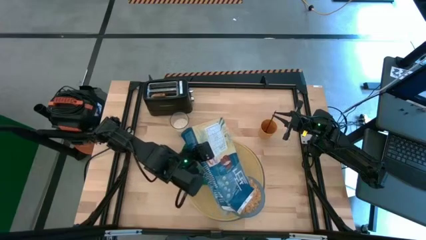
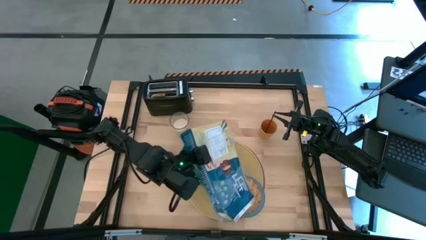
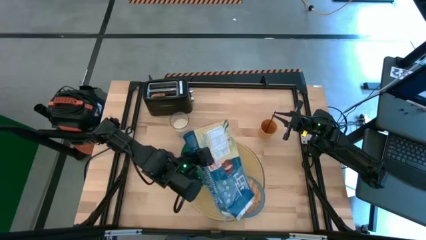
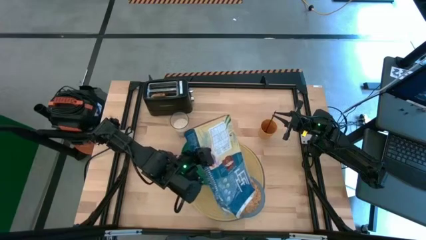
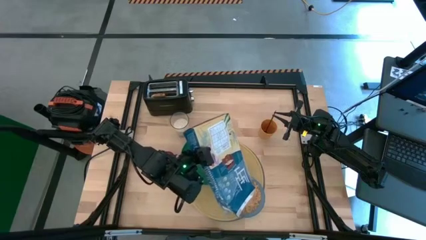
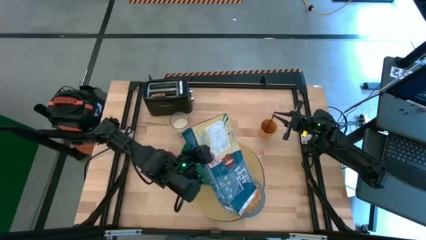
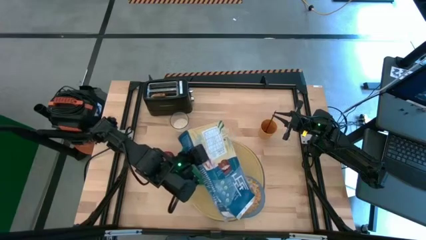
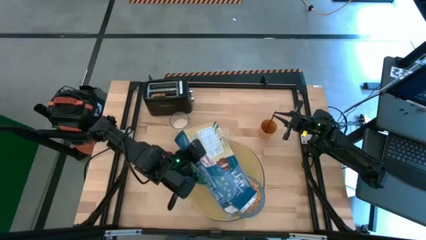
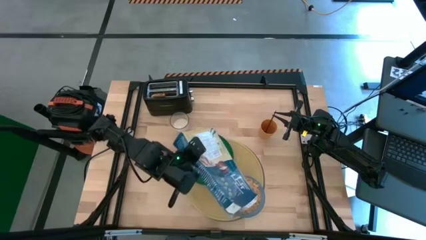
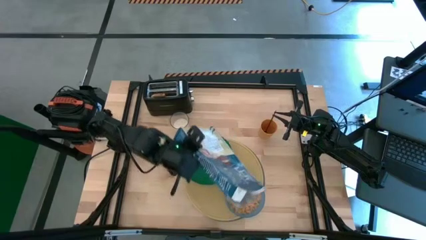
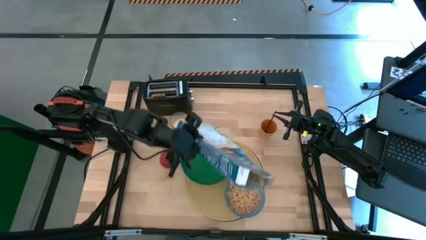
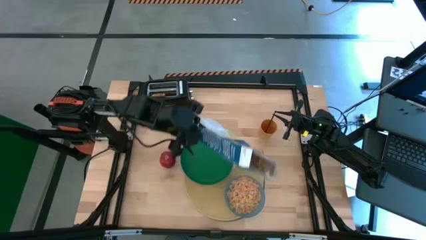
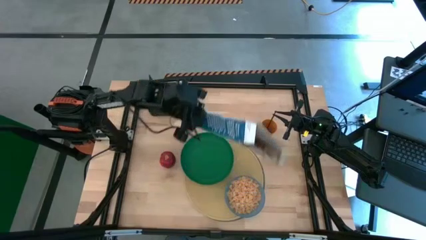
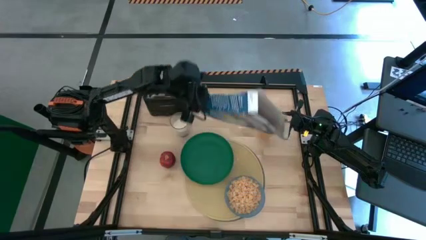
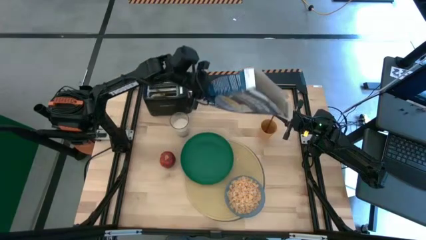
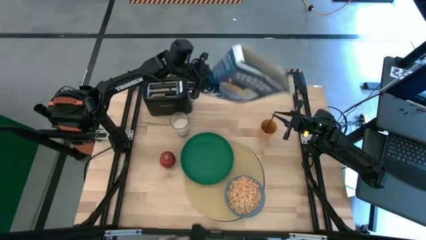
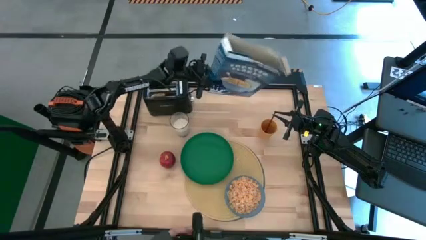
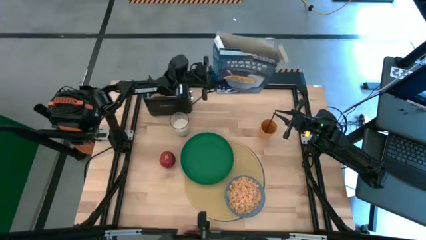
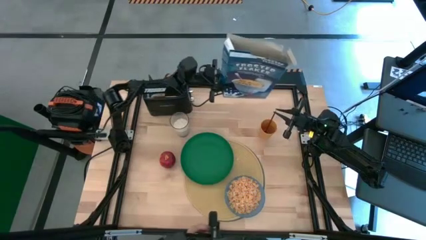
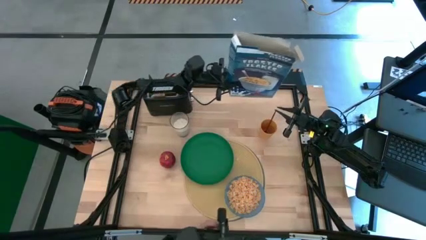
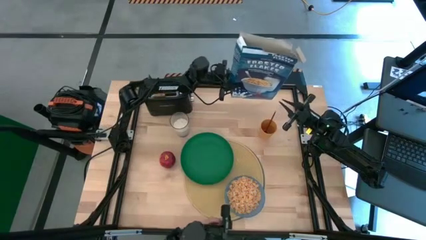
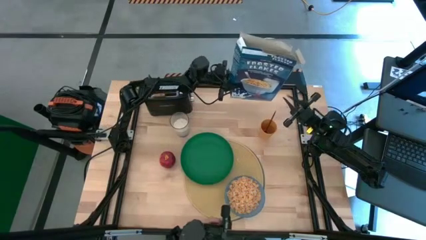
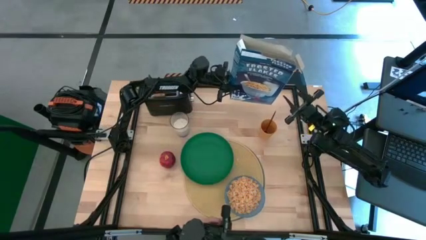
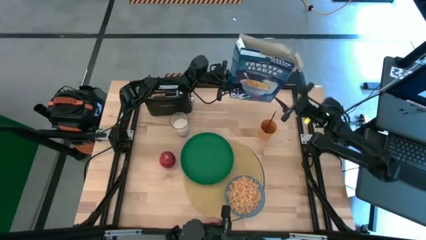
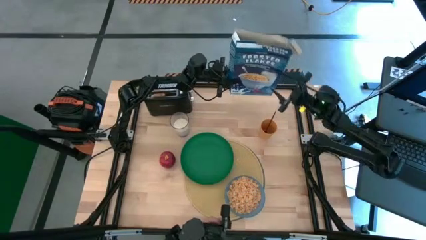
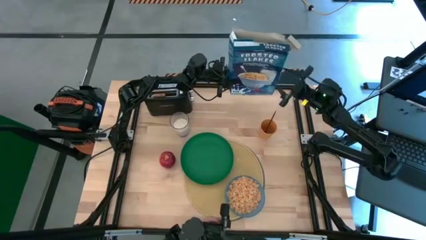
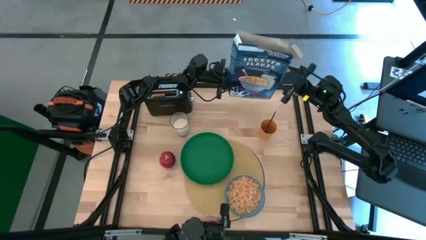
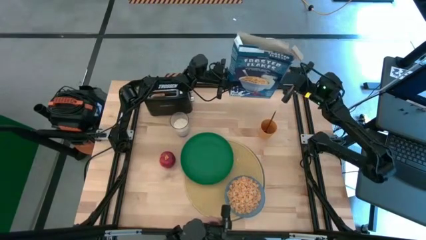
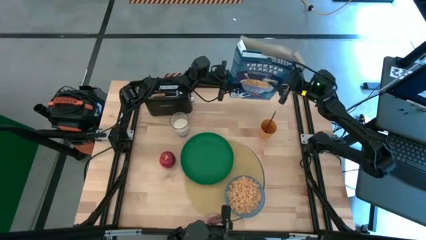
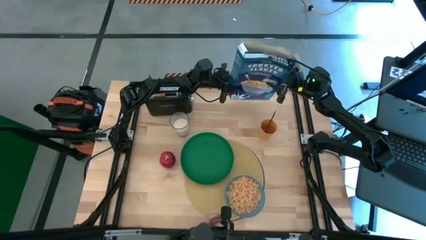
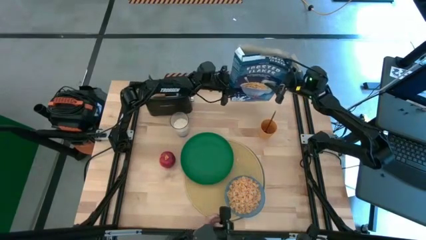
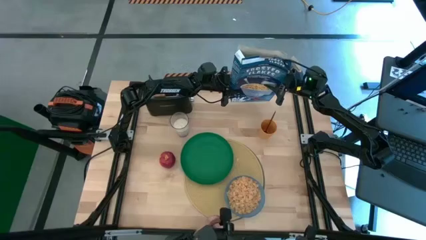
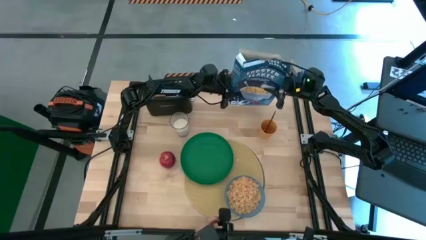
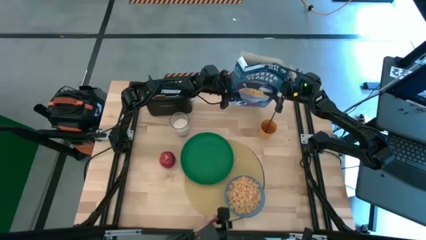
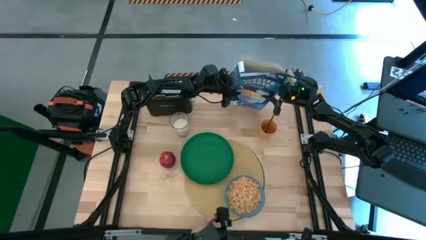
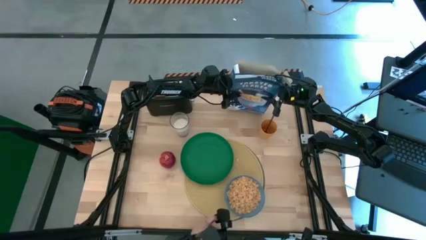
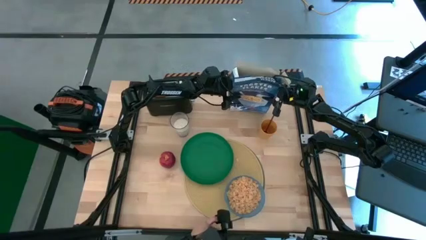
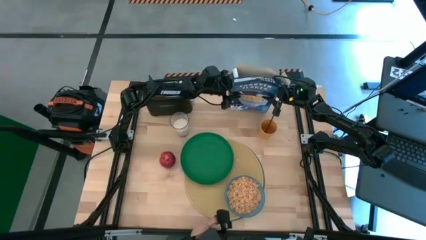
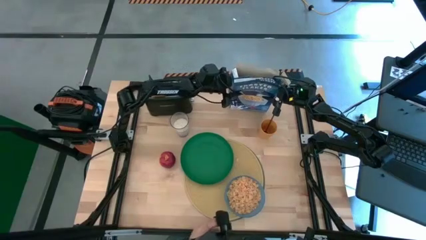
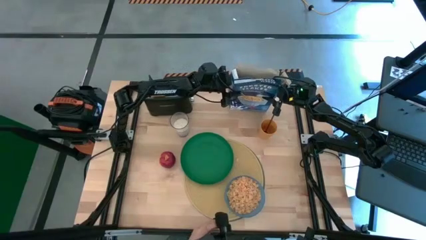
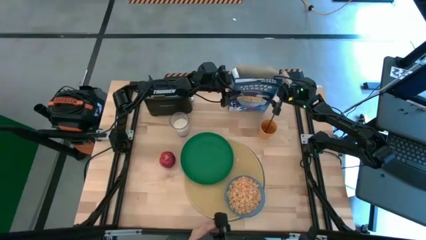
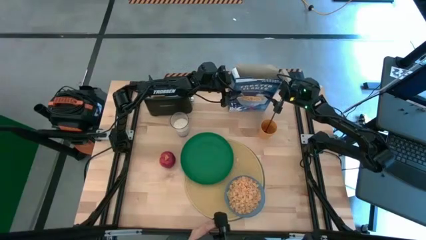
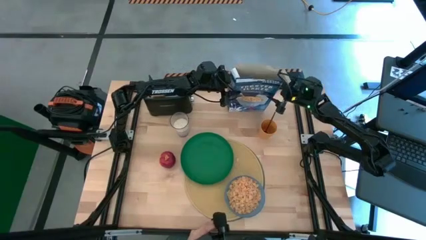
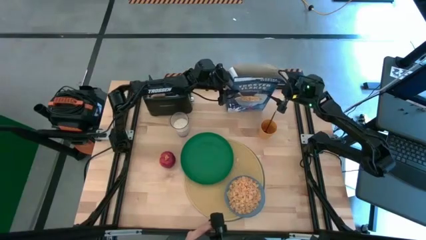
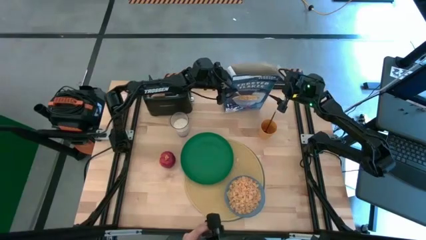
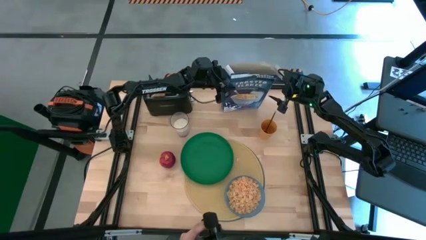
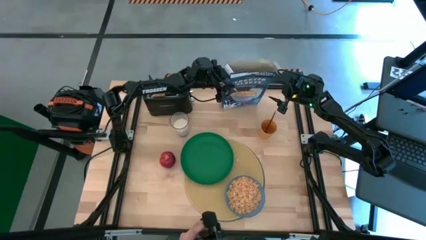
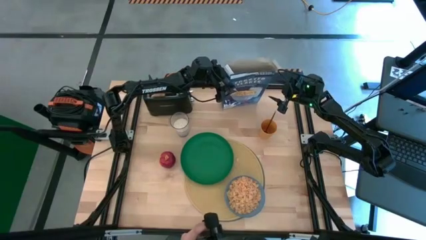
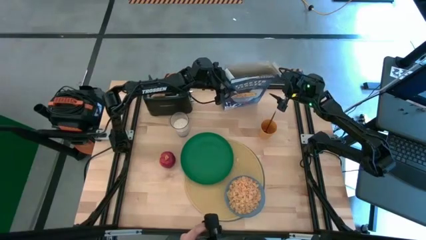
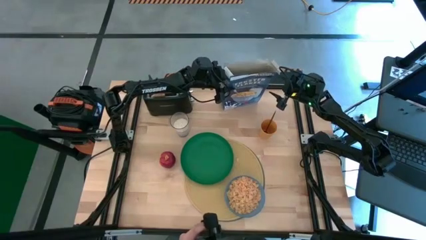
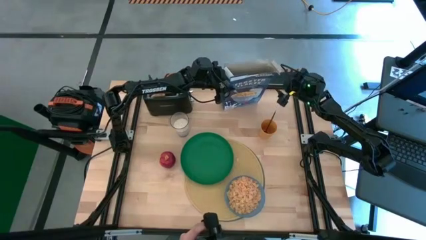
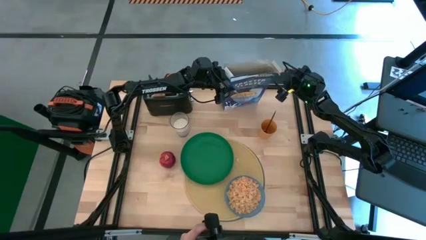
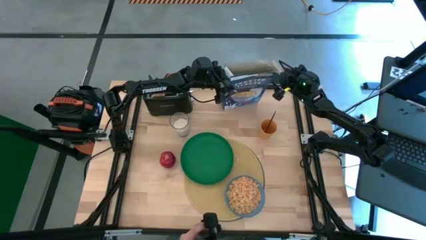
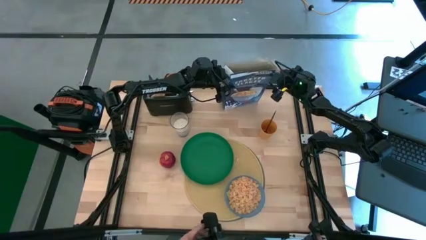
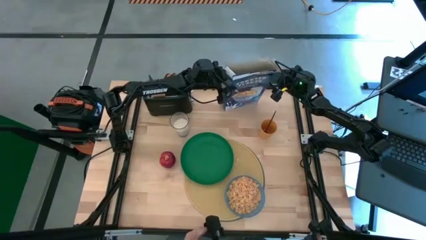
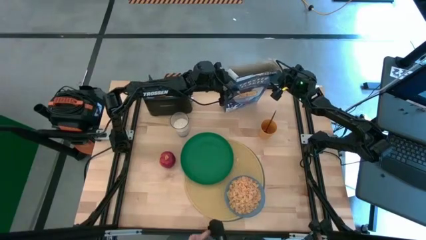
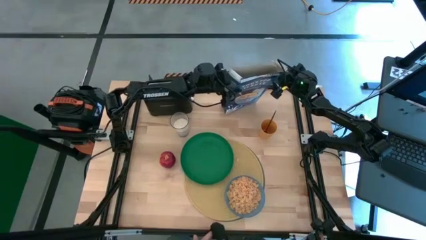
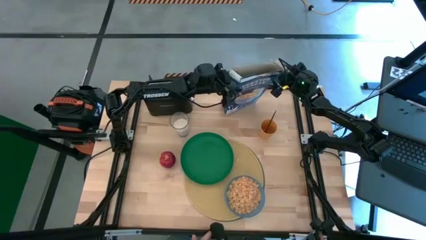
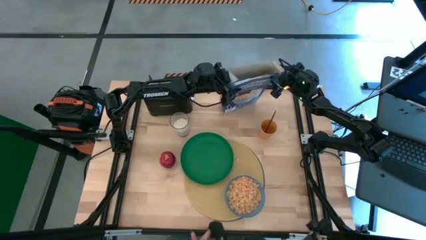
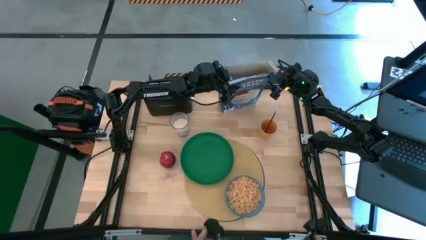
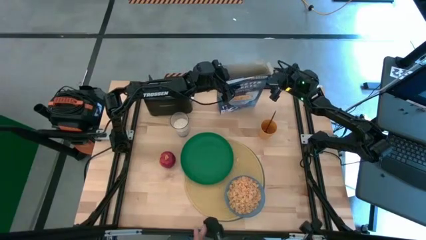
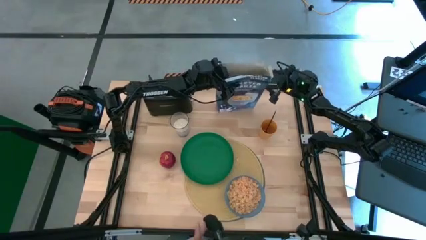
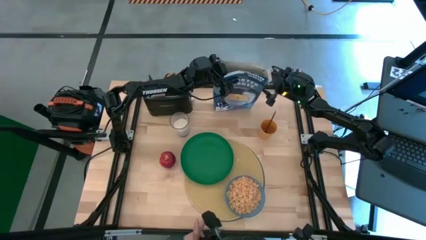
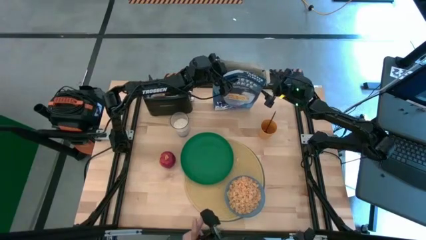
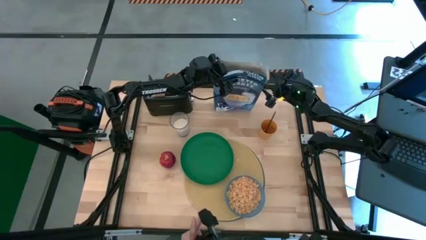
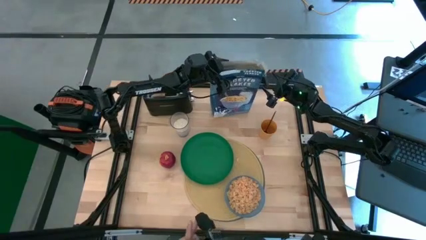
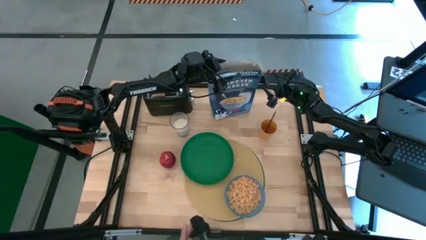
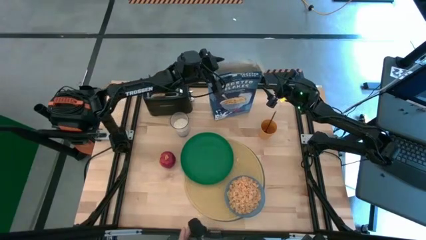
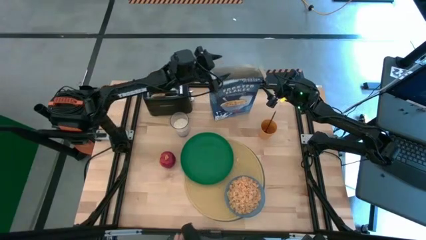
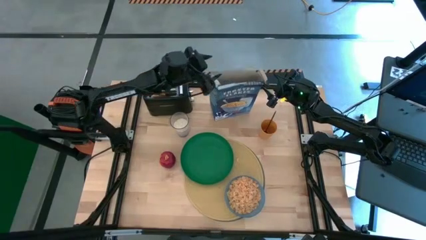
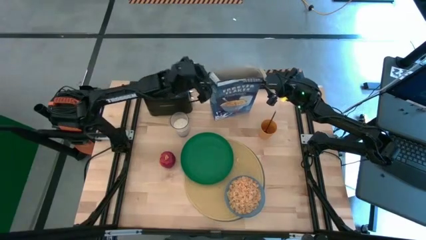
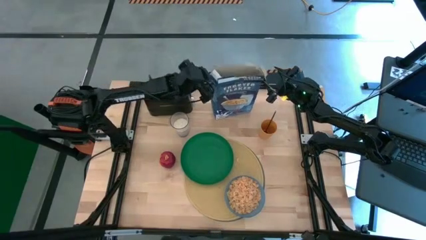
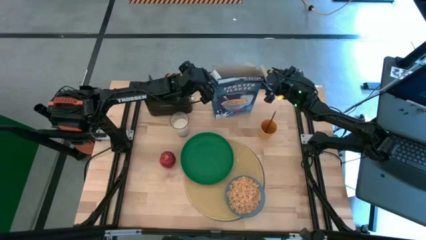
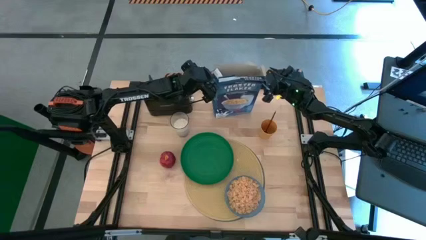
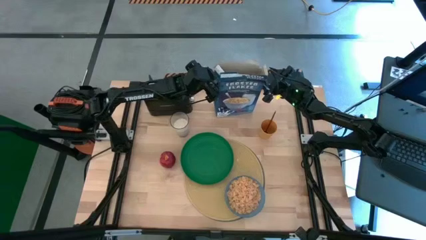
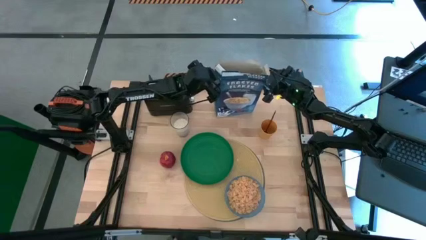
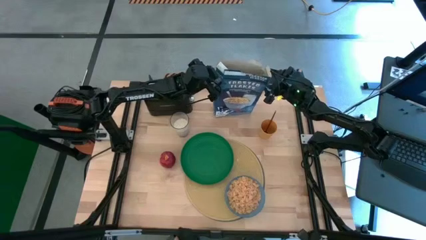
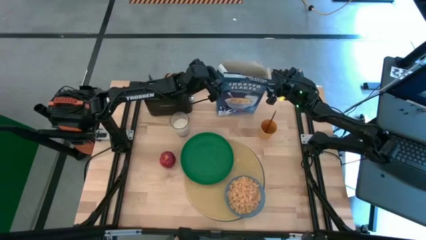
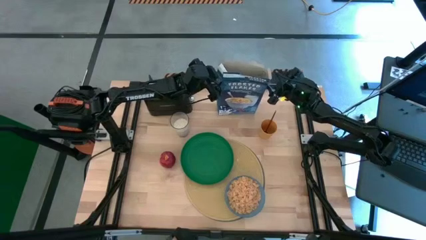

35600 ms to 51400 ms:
Task: Arrange a breakfast setting
Pour the cereal into the blue bowl
